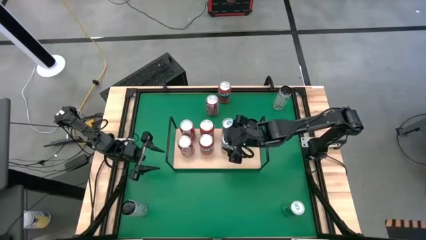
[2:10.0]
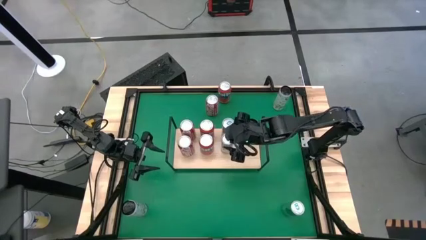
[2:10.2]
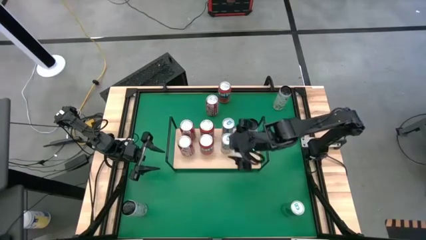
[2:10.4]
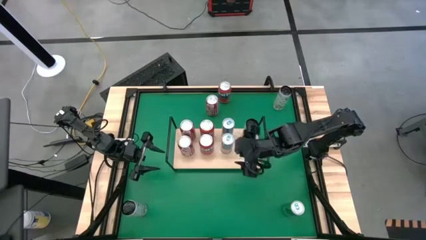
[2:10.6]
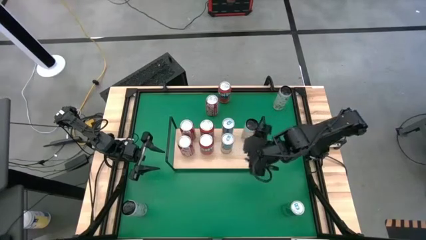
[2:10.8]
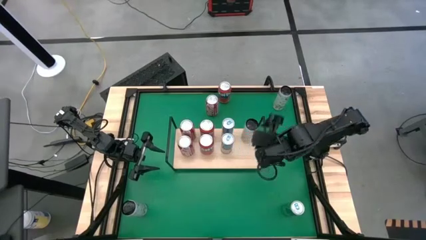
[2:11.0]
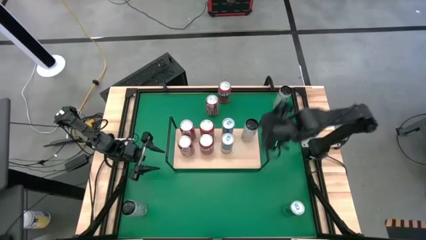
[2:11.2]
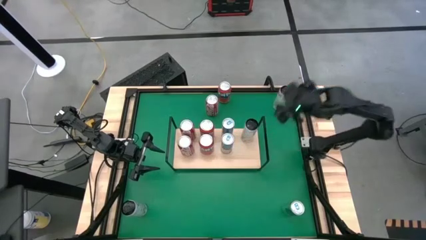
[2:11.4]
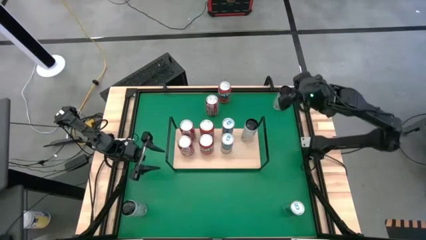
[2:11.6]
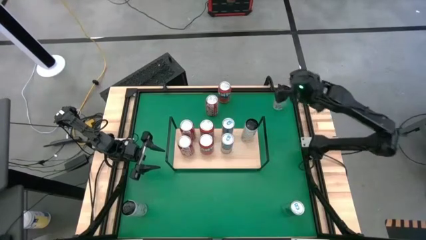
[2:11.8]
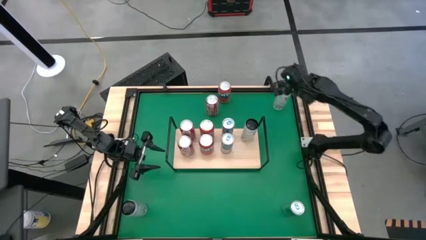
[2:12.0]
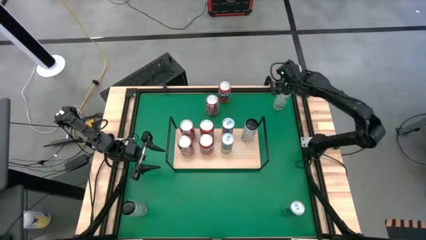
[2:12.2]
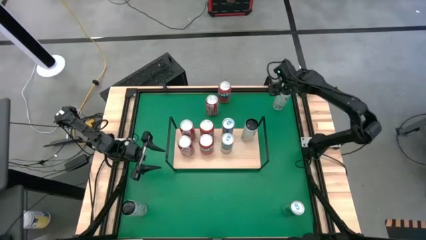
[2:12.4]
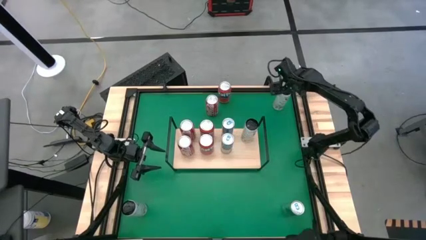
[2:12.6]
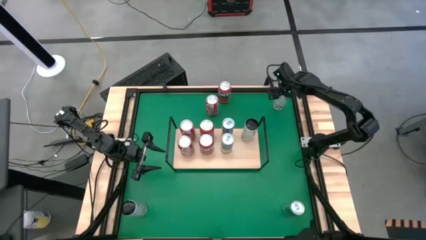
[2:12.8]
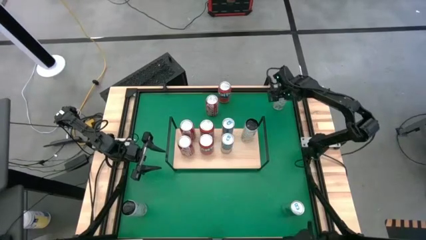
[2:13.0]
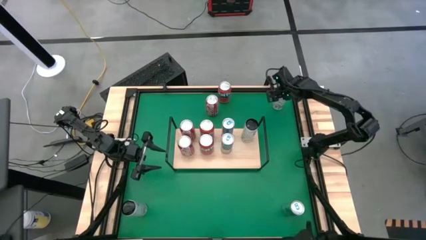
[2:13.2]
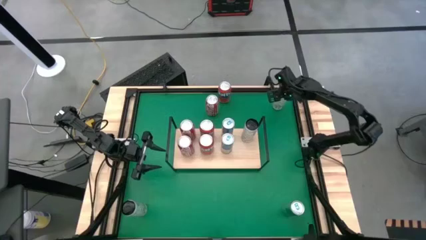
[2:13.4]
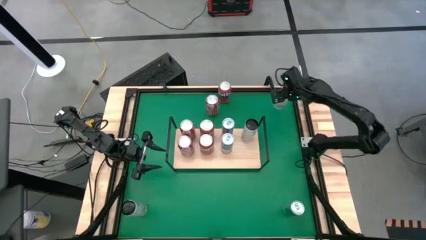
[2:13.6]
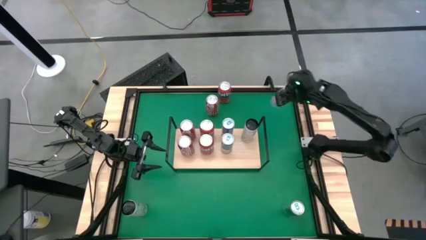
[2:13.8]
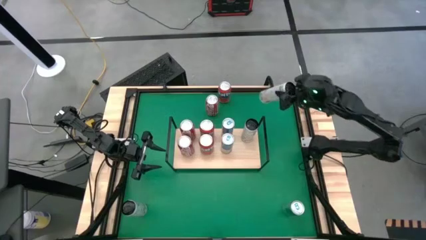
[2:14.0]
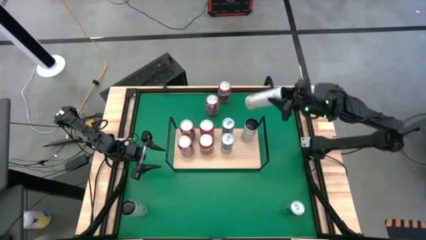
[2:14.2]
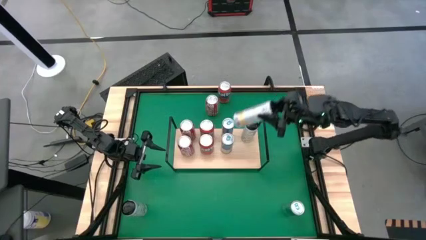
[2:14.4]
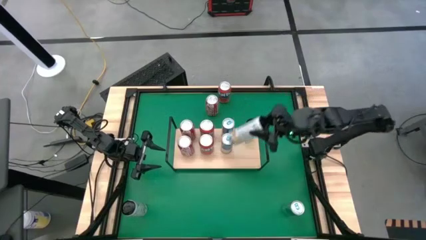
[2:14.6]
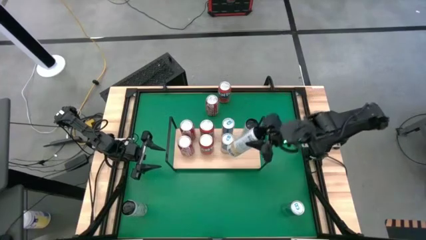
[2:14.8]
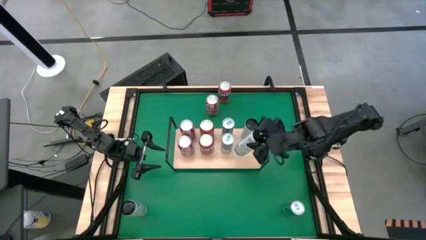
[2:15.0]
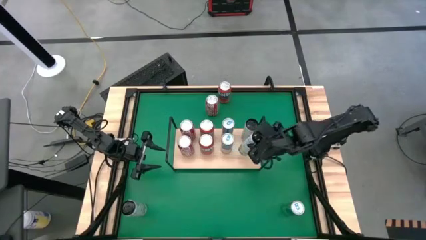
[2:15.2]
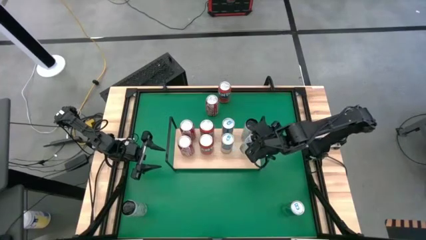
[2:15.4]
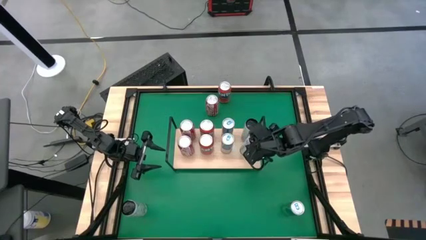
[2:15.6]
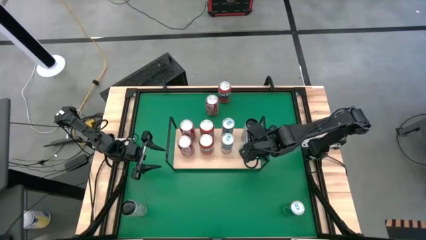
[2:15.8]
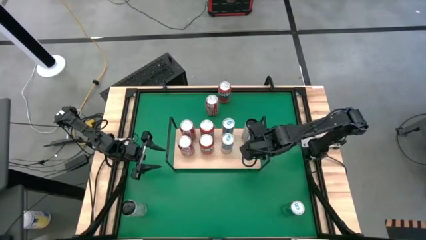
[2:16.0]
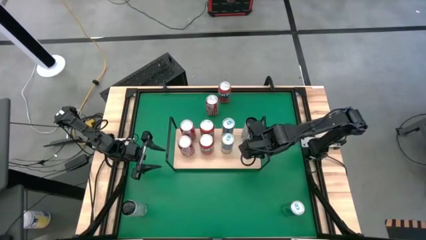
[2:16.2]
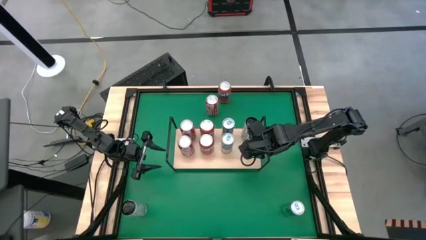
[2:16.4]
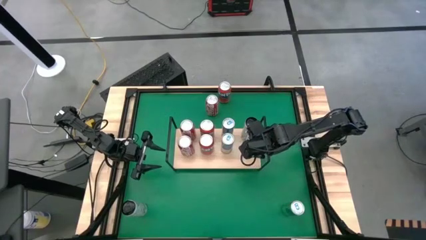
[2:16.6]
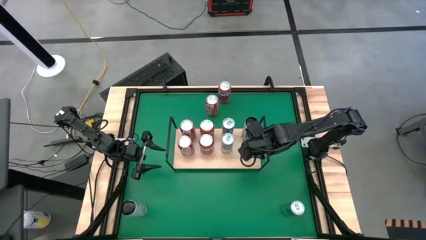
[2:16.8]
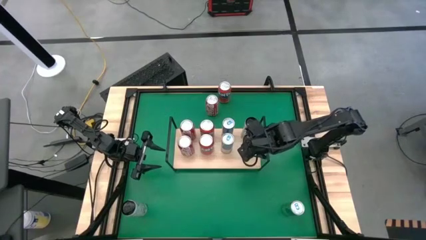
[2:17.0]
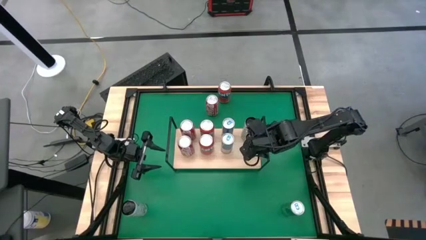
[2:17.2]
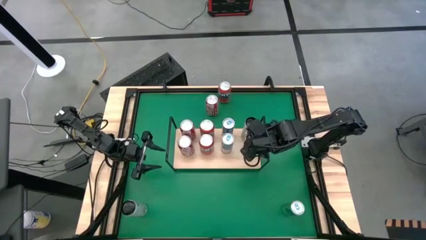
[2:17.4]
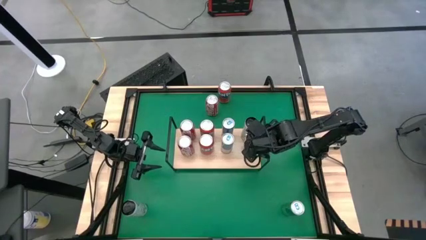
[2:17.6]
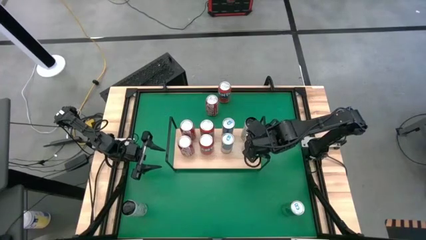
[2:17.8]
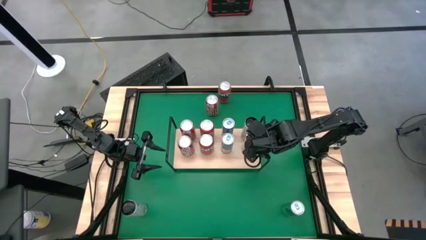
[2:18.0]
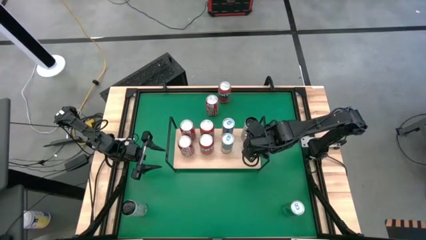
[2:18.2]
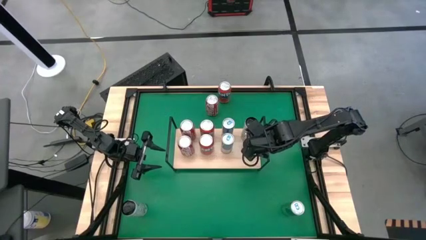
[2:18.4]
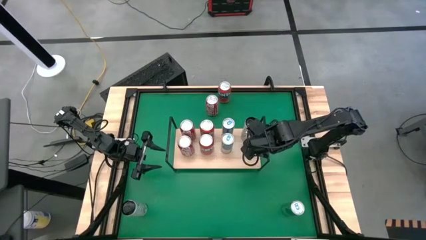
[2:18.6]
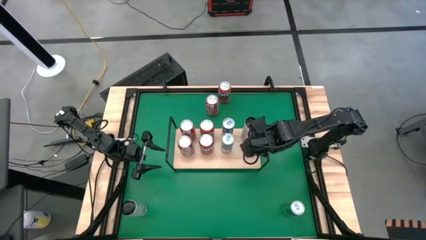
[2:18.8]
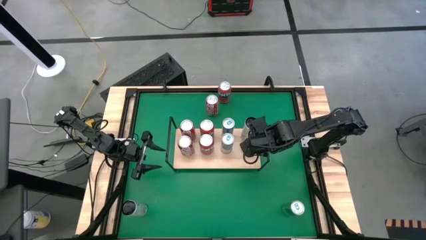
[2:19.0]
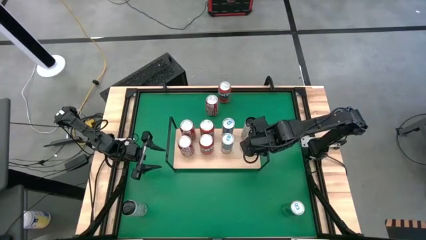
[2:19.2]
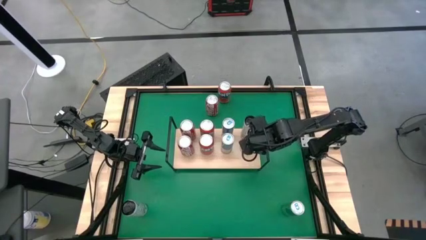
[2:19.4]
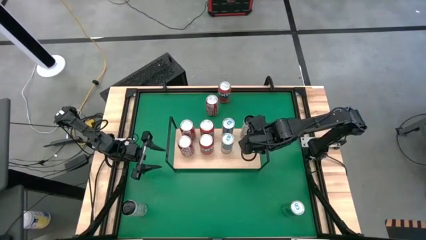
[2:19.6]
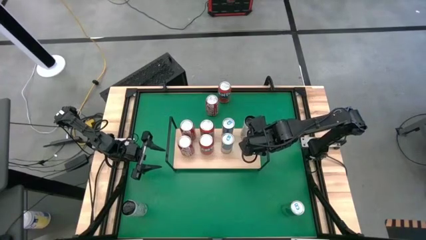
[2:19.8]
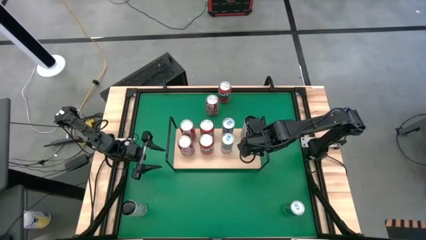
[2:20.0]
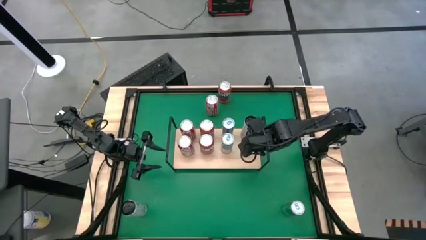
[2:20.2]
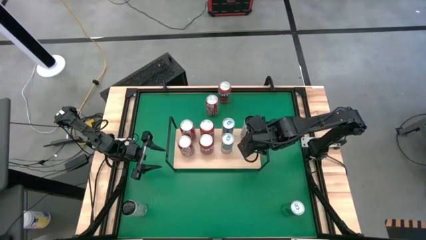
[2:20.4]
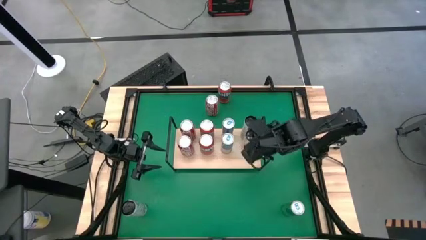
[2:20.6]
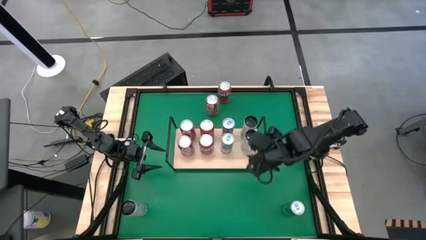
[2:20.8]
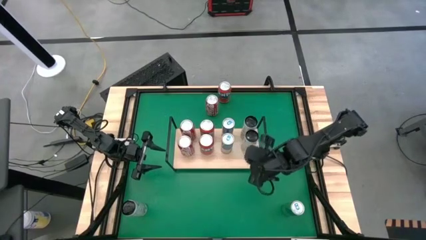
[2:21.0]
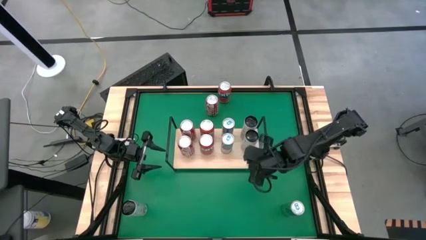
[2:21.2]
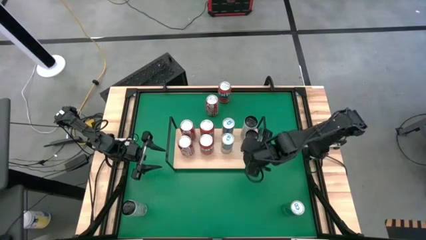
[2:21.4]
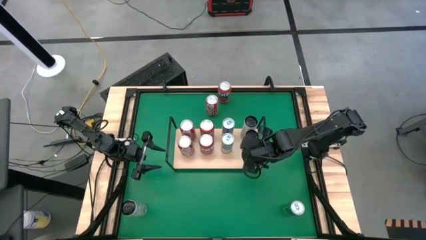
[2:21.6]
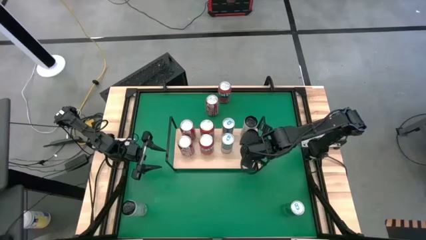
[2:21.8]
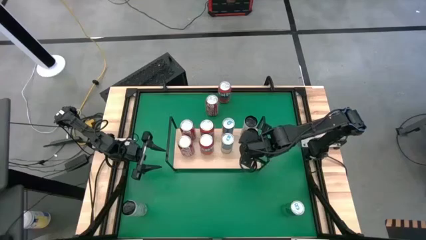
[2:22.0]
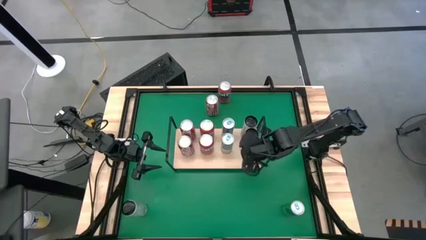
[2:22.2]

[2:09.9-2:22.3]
Task: Place canned beverage on shelf
Put the top white-yellow soda can on the shelf aligned with the other white-yellow soda can
